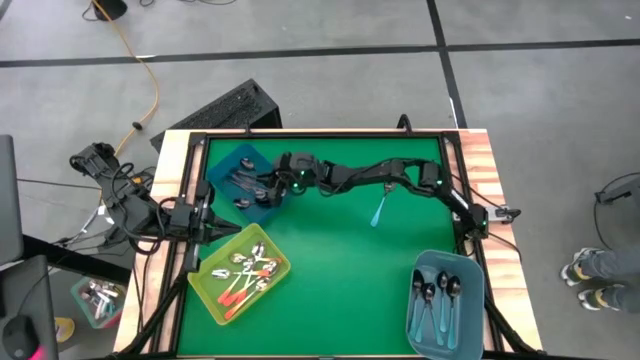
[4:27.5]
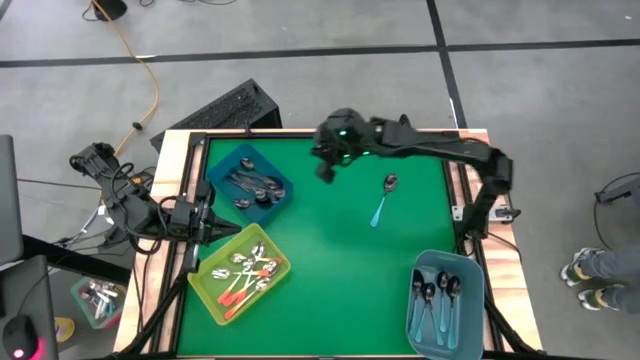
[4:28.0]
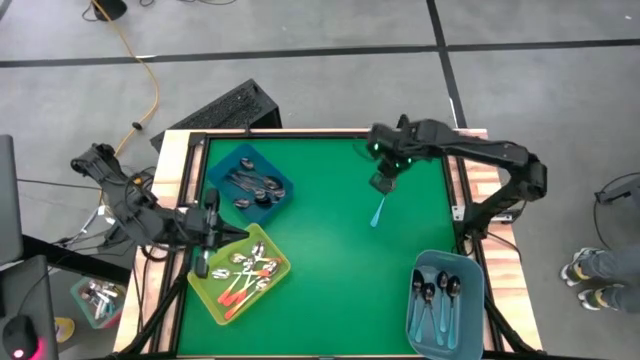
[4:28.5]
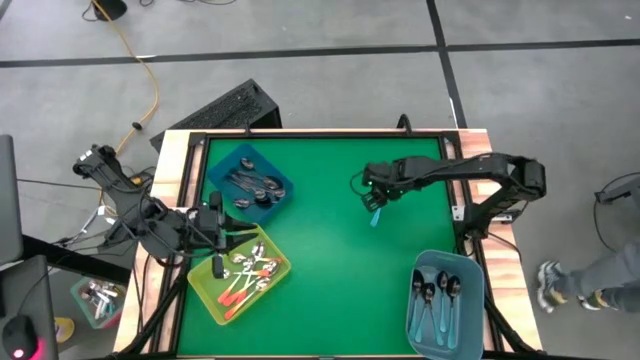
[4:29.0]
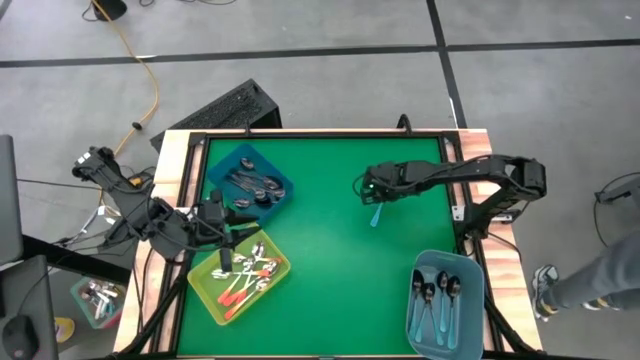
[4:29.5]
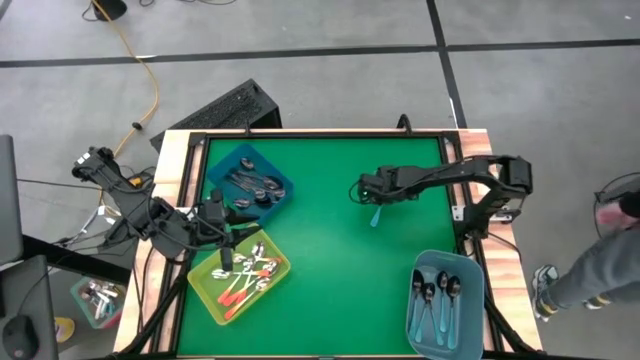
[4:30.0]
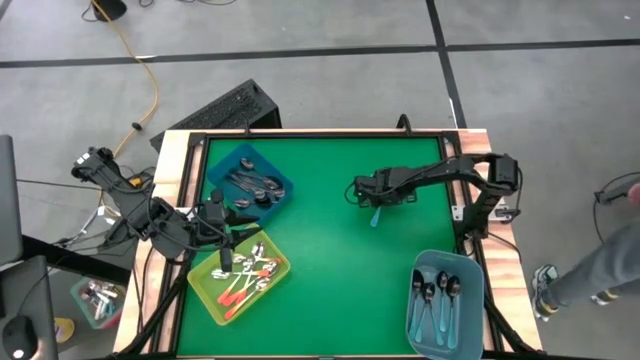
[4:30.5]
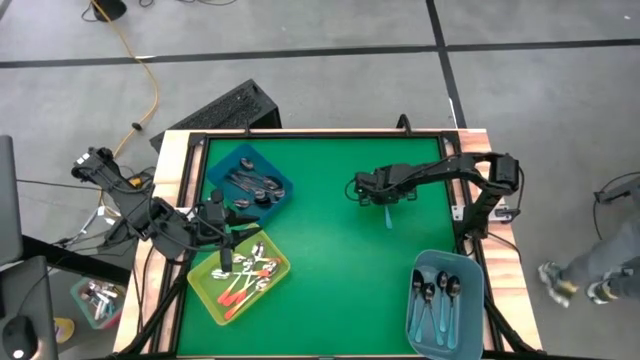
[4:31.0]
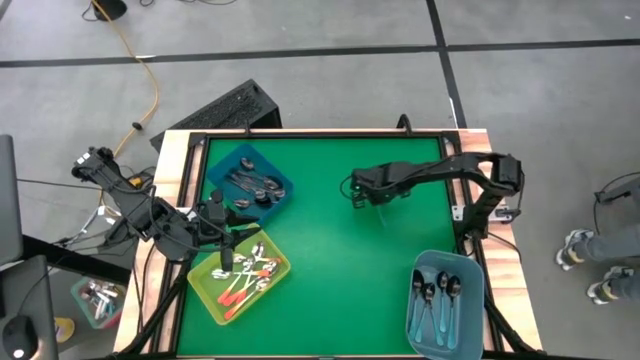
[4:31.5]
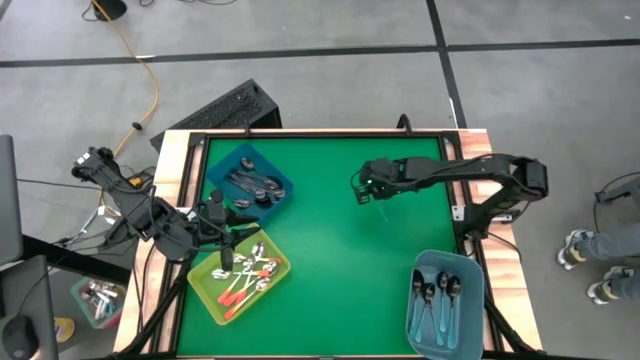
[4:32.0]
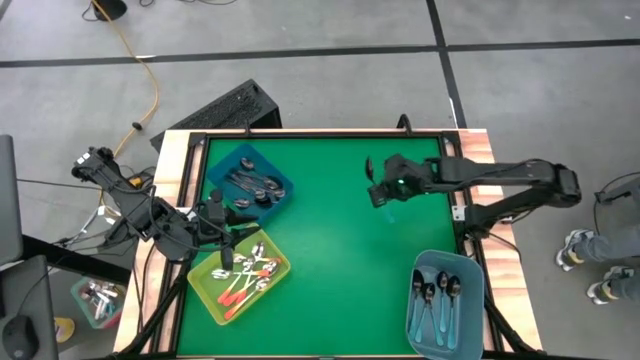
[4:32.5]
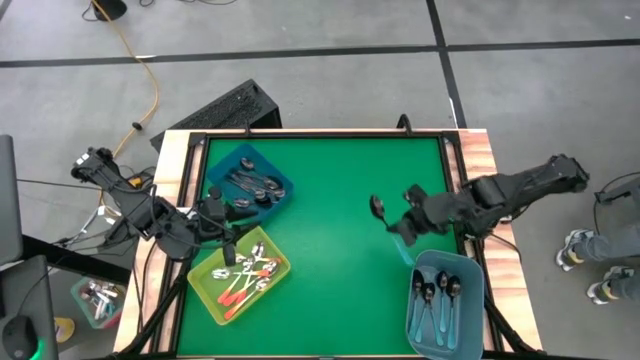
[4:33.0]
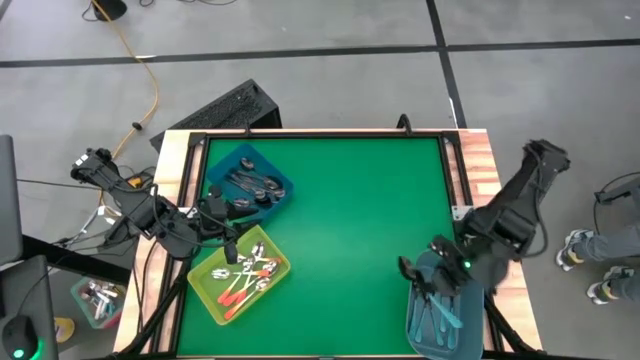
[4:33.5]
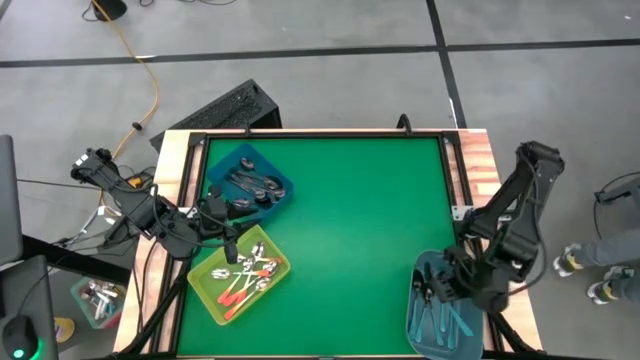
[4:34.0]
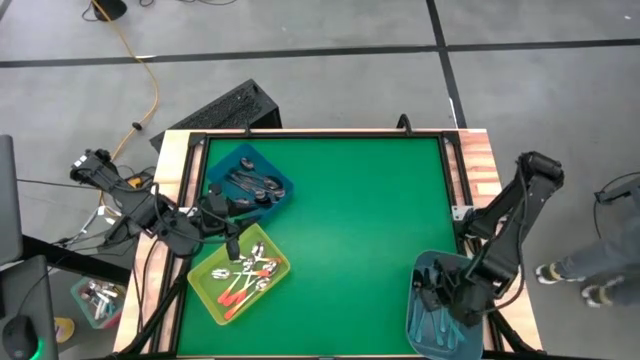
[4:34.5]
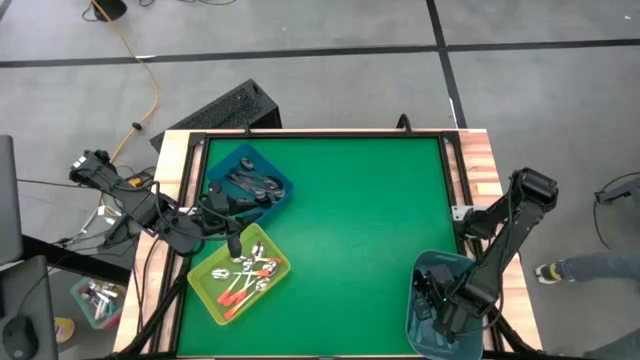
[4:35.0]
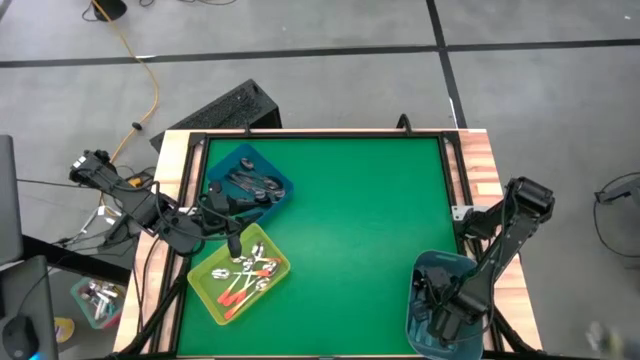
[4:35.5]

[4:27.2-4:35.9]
Task: Sort silverware by color (type)
Put the blue spoon into the blue bin

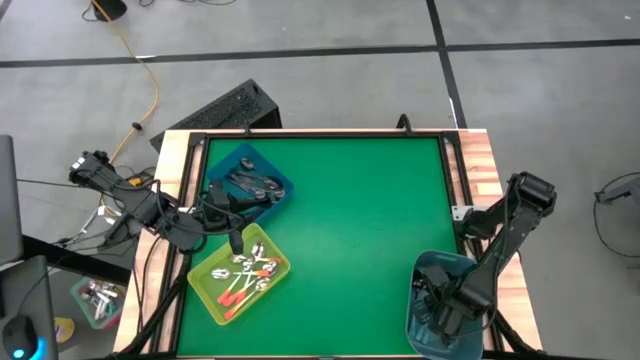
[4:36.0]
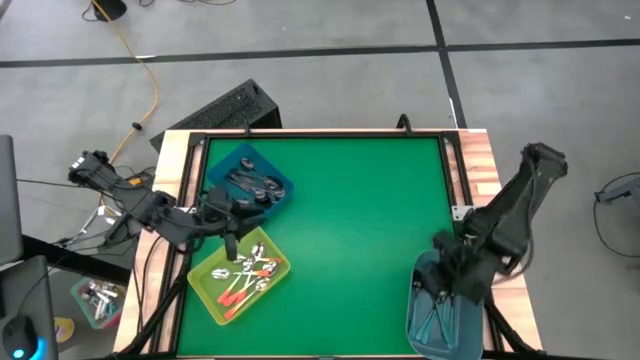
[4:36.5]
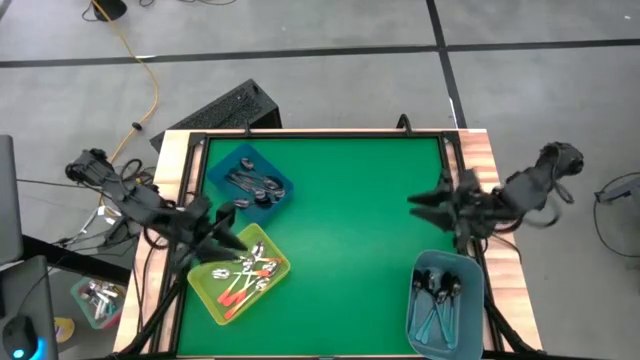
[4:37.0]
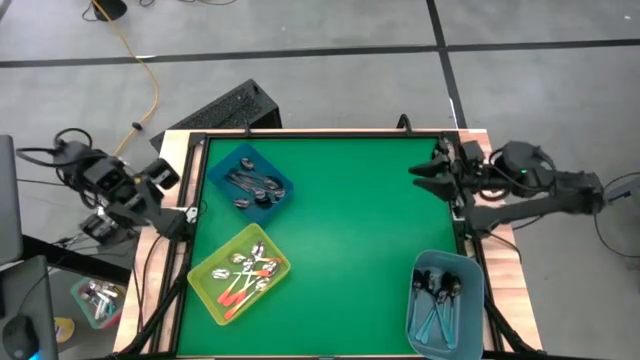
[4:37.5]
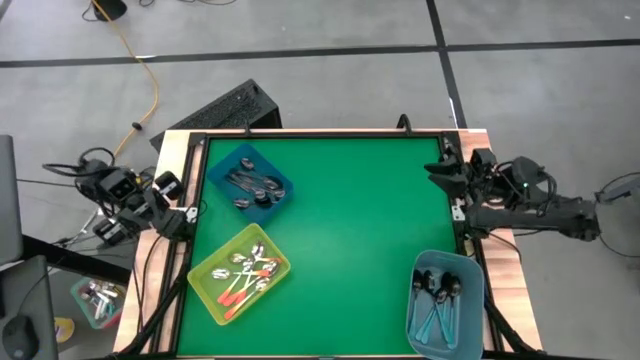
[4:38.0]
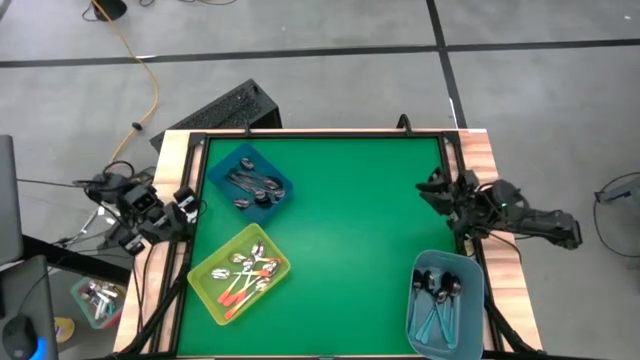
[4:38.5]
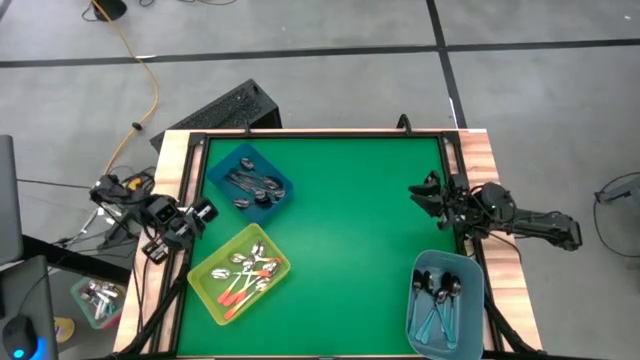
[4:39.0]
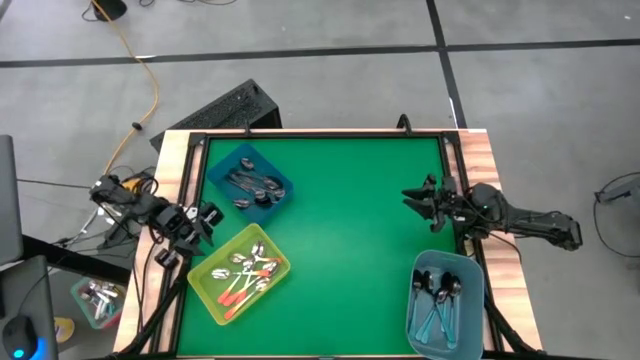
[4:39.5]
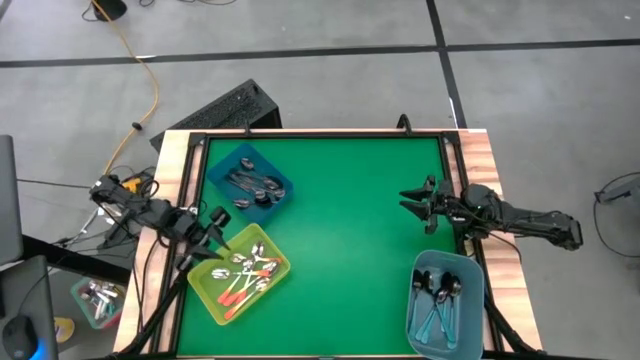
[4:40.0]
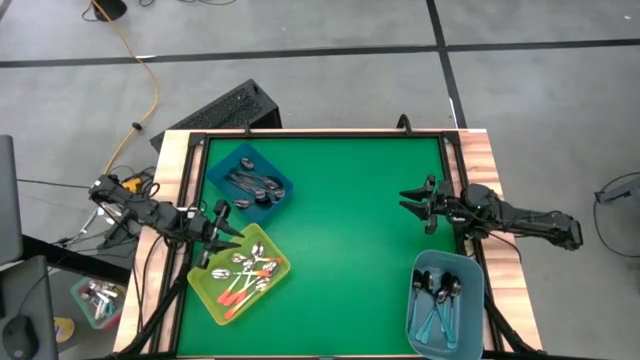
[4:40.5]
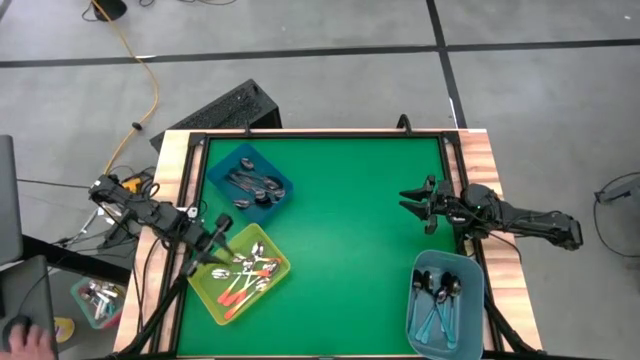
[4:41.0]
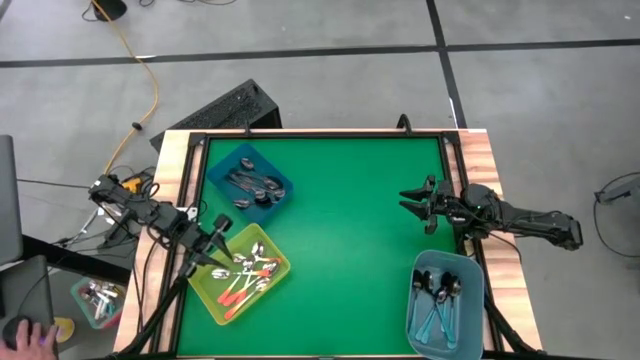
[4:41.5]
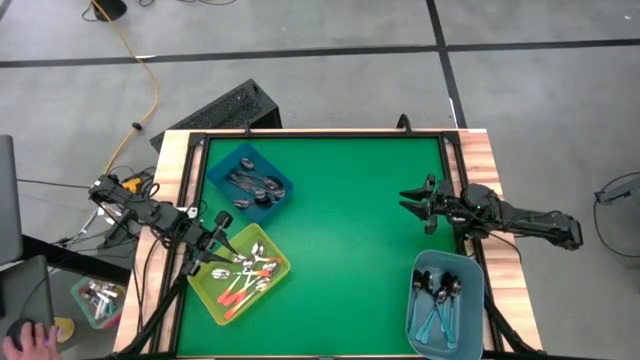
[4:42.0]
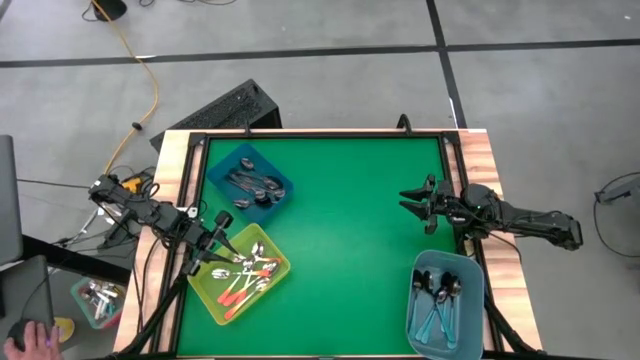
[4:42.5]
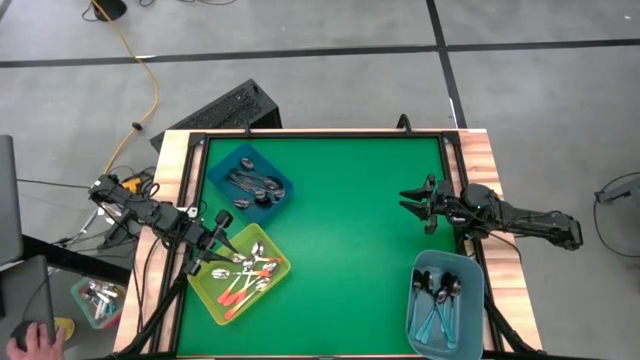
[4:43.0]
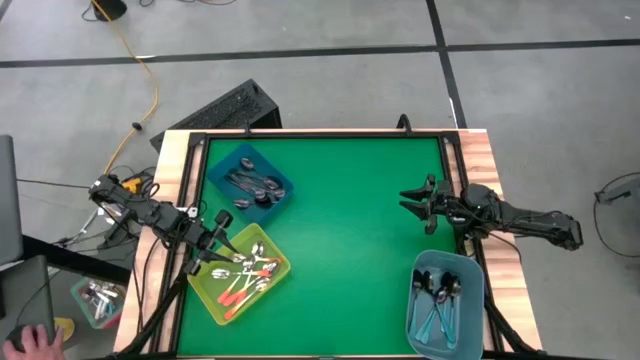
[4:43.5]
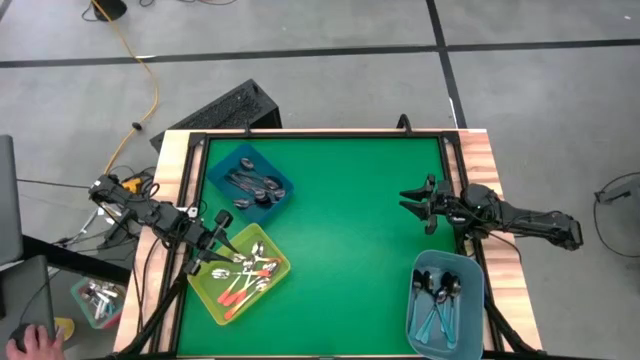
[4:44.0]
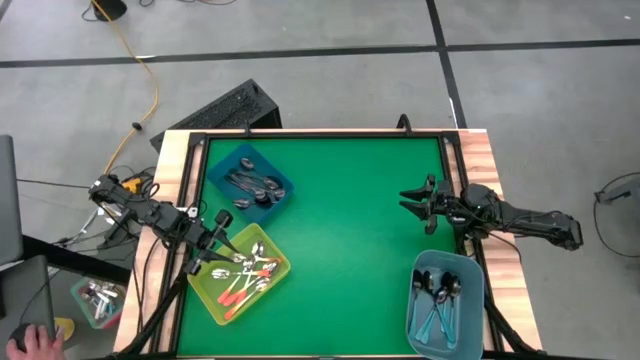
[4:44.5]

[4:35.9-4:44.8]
Return to Home Position

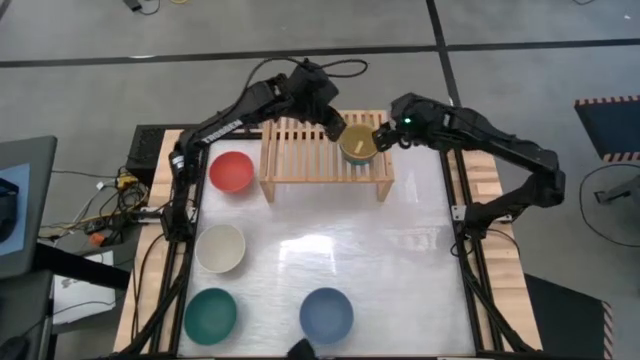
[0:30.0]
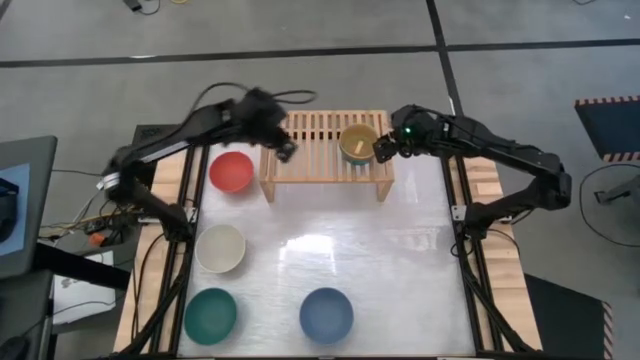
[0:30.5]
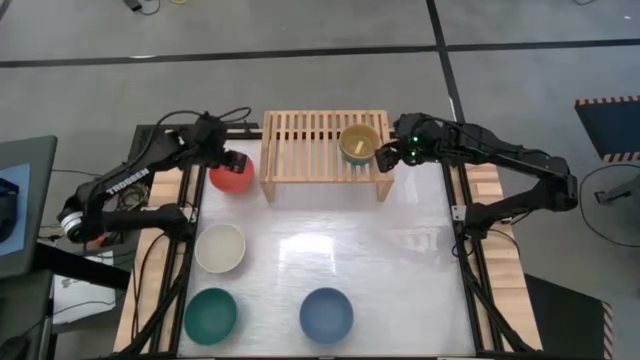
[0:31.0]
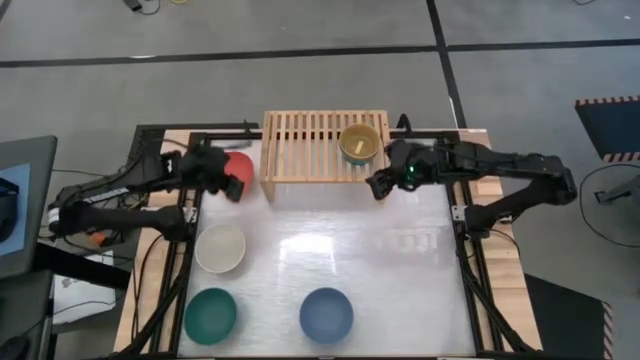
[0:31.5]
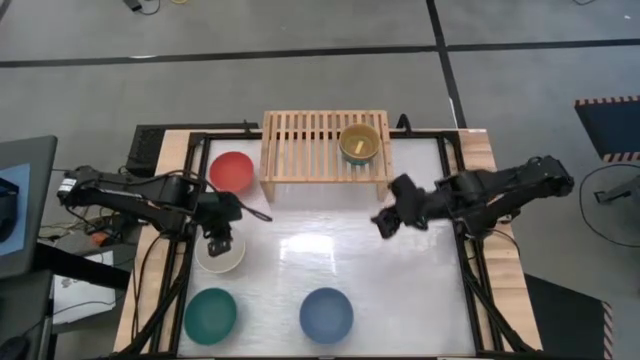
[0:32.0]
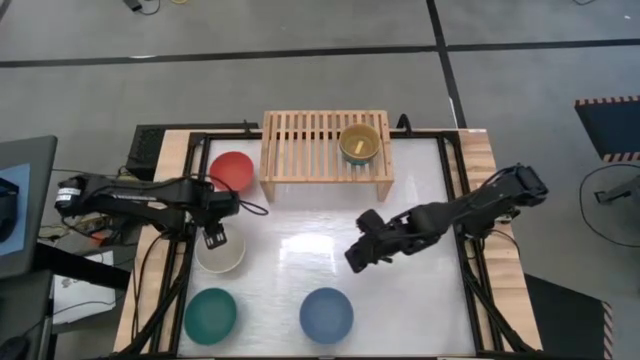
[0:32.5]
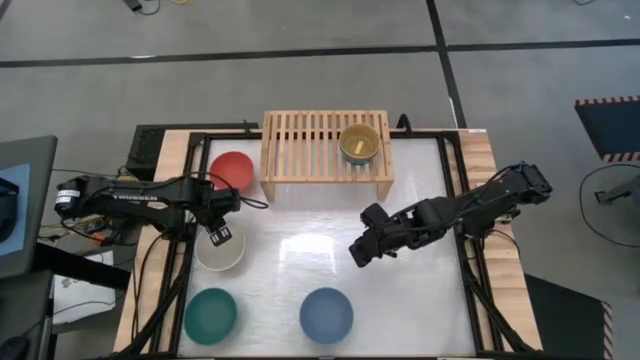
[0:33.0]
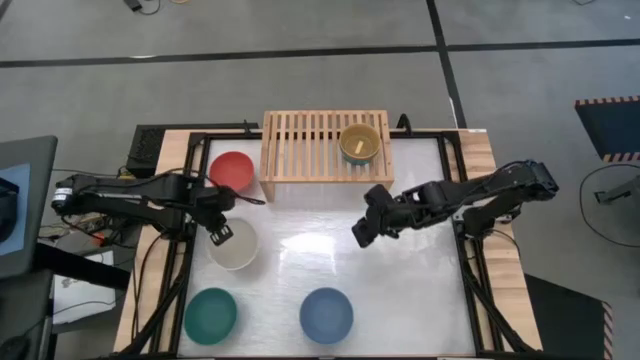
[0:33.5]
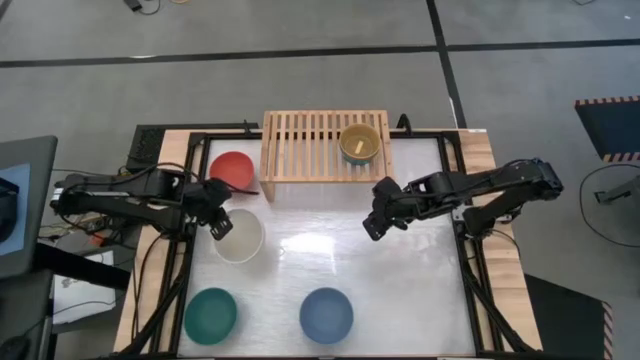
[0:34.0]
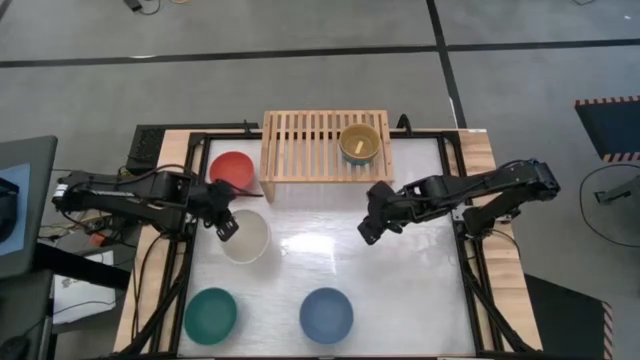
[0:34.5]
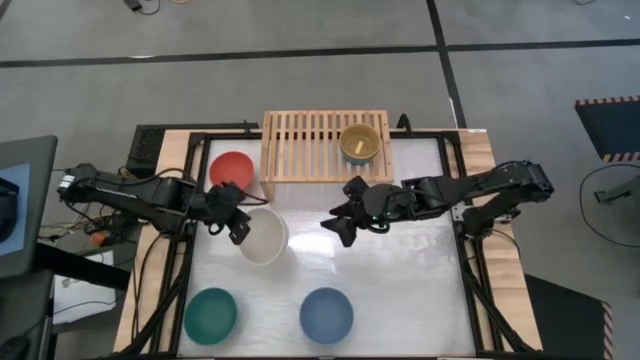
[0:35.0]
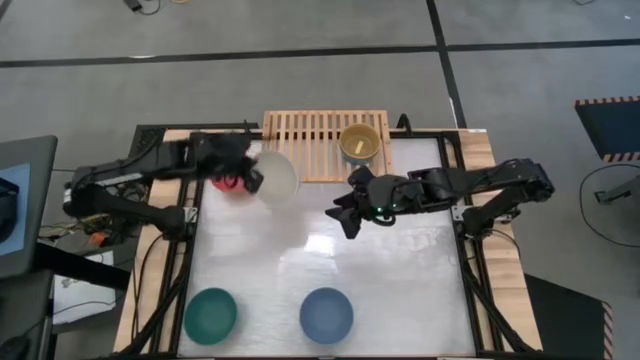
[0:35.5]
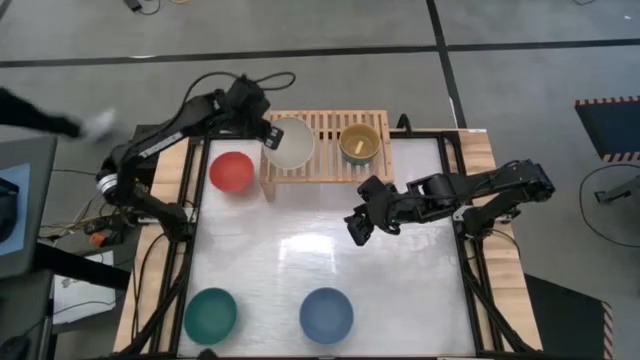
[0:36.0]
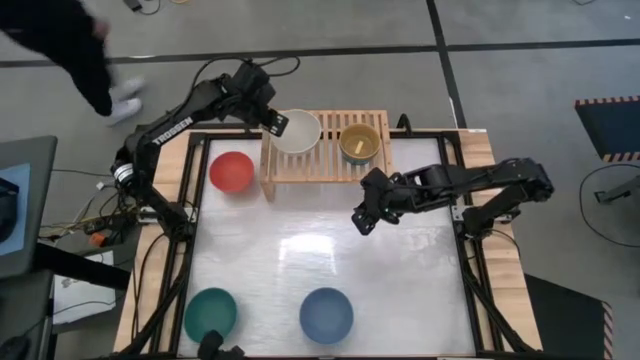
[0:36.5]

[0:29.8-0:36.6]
Task: Place and stack bowls onto a shelf
Put the large white bowl on the shelf
